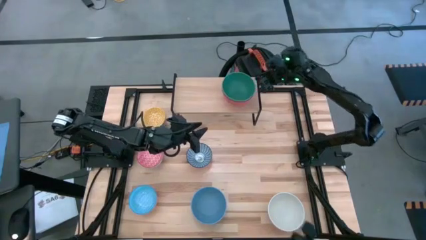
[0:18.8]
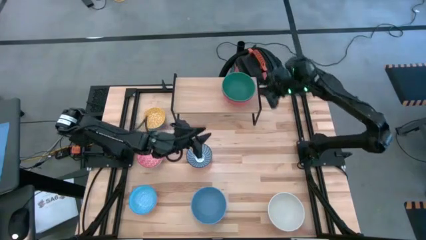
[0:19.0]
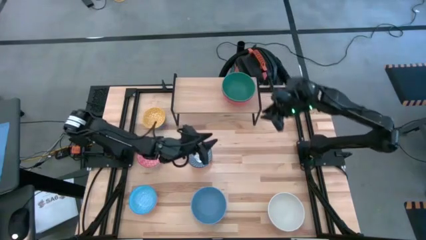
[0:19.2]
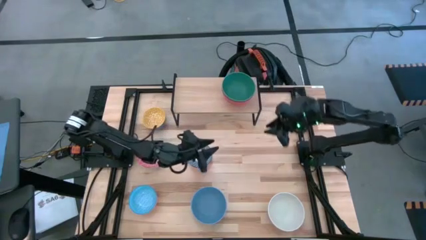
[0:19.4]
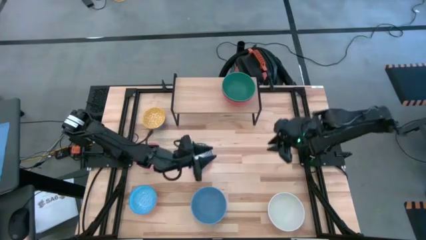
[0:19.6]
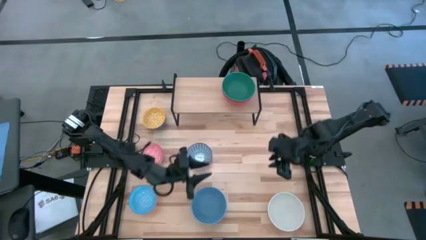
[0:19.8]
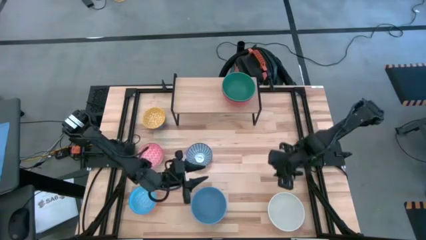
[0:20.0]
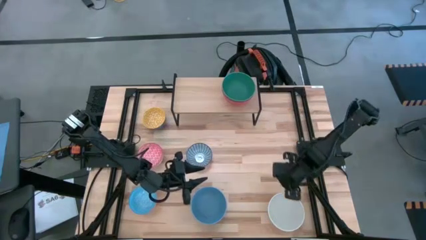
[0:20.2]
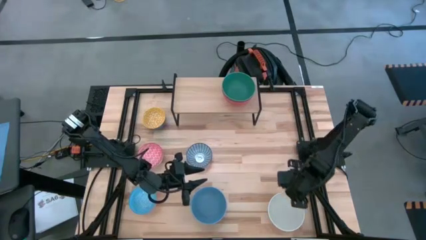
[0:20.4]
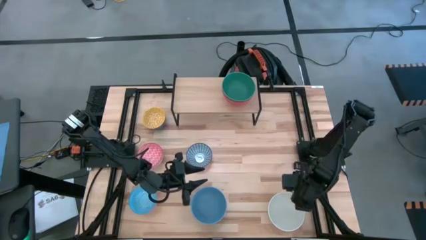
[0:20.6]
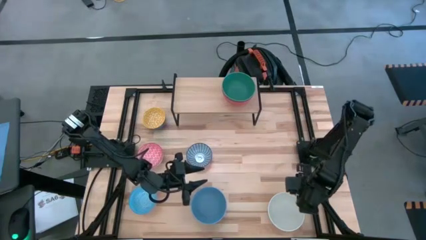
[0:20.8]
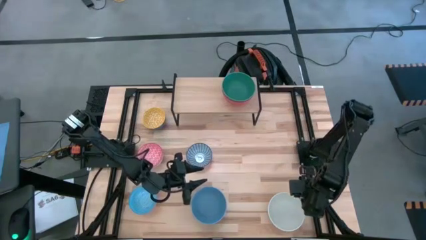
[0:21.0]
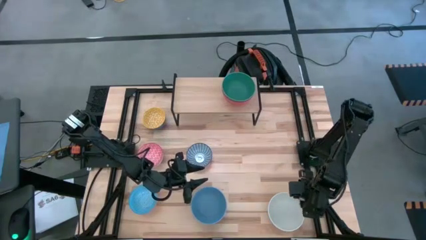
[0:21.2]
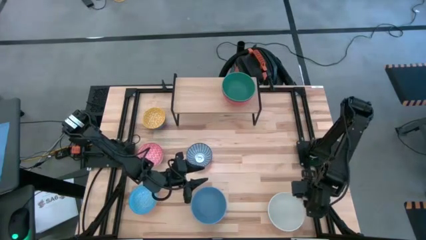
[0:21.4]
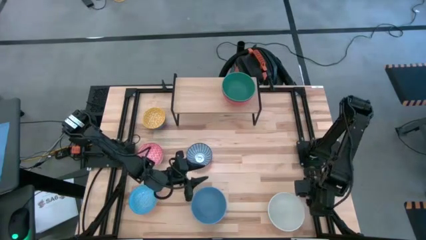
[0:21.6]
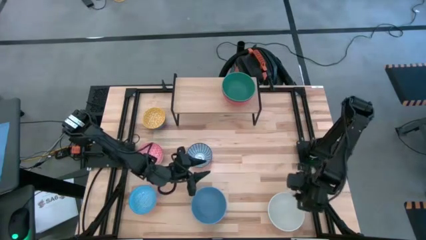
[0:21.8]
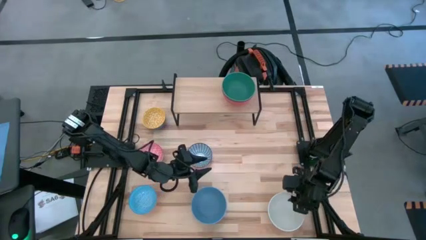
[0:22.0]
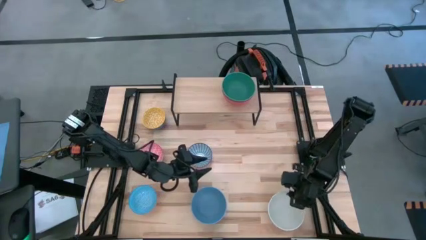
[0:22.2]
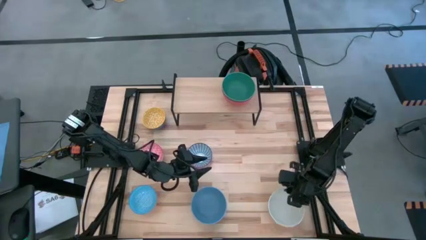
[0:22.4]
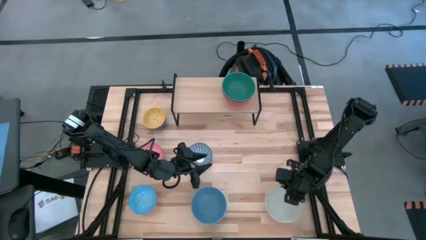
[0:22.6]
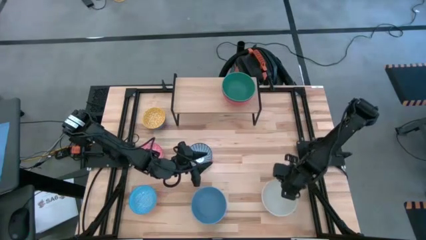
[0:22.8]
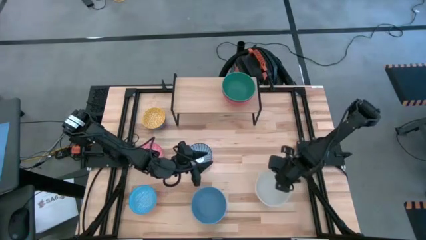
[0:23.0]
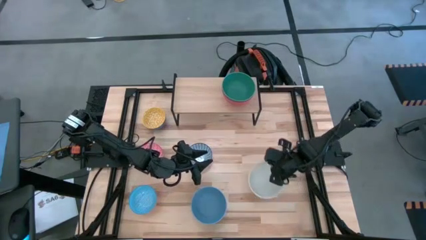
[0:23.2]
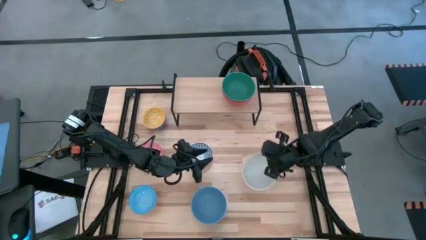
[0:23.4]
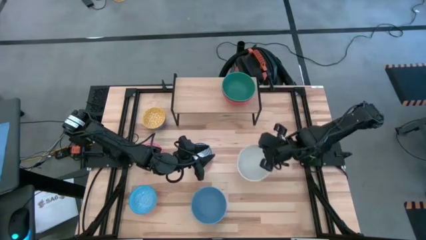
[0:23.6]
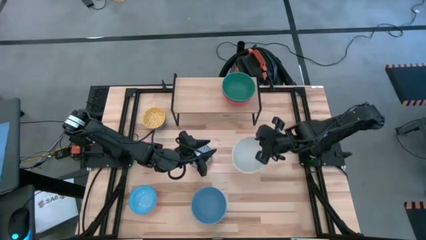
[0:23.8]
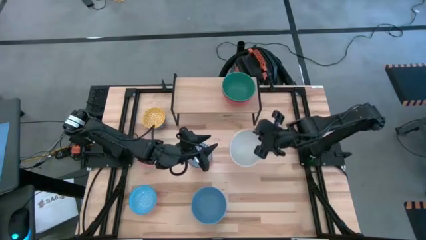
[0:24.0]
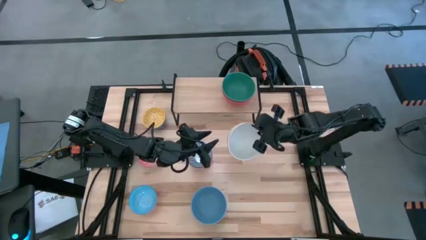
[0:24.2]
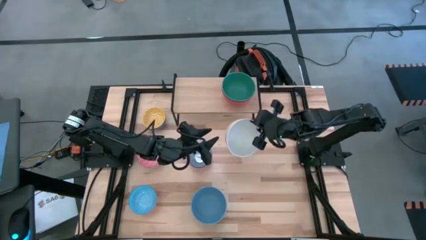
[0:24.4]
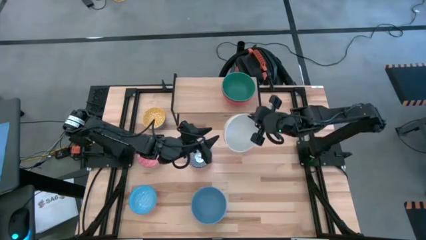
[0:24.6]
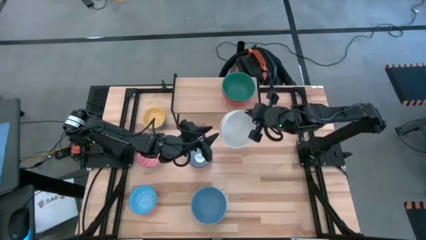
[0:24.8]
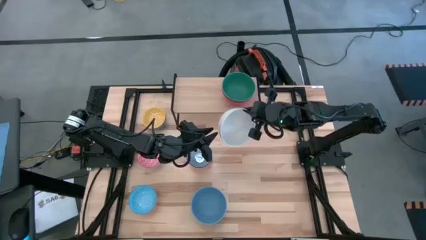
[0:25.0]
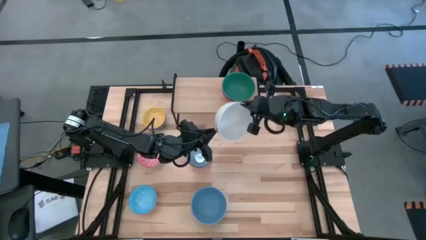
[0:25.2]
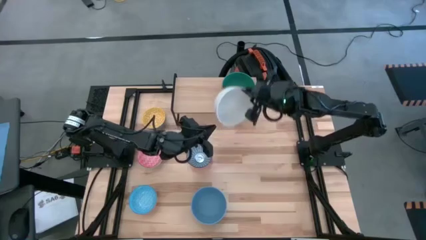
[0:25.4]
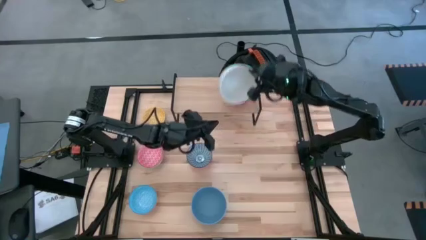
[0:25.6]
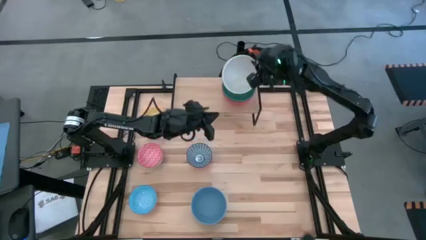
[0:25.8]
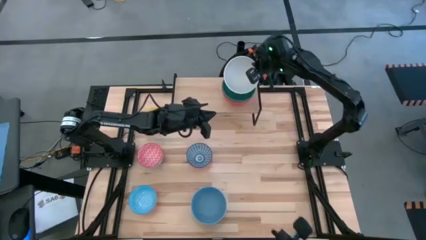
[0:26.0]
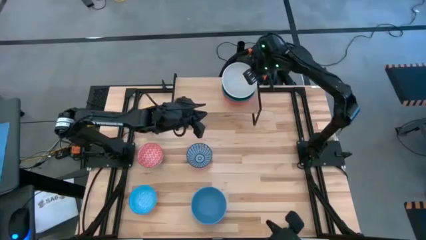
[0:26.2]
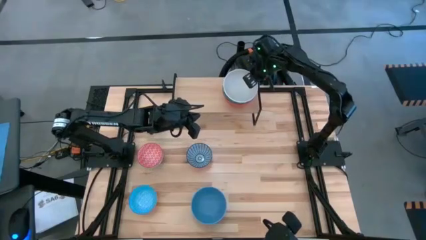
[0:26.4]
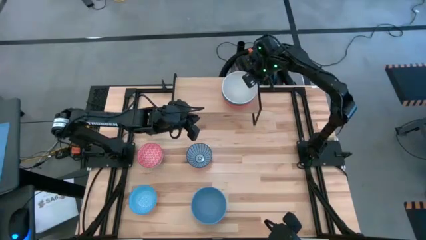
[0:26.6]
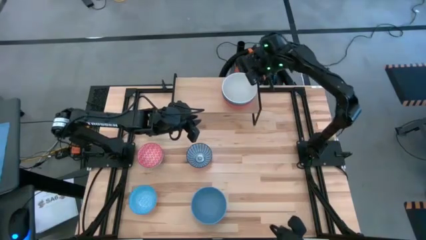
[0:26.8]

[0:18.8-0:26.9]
Task: Place and stack bowls onto a shelf
Stack the white bowl on top of the green bowl on the shelf

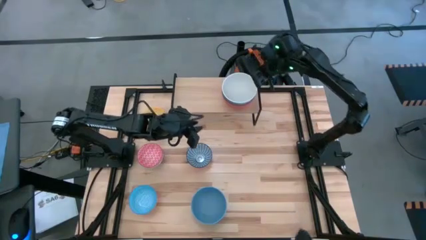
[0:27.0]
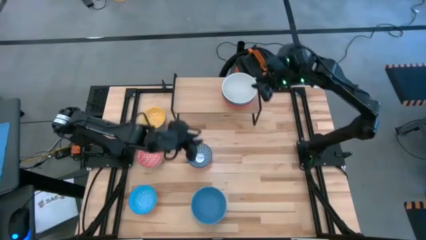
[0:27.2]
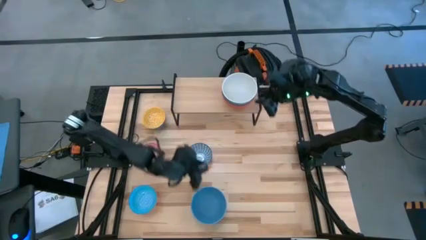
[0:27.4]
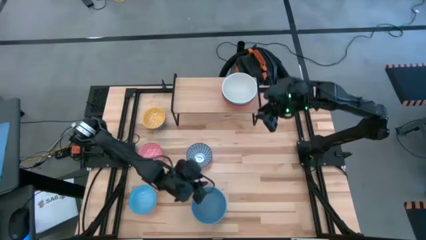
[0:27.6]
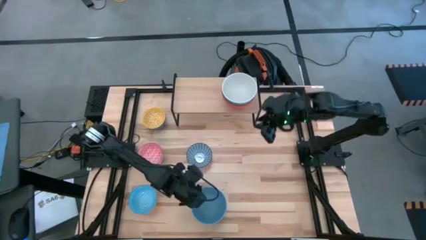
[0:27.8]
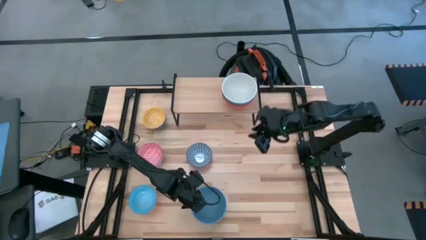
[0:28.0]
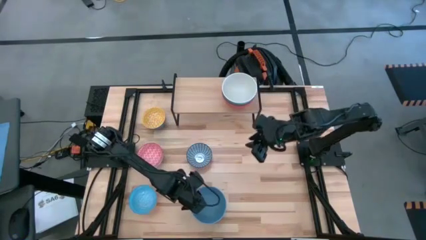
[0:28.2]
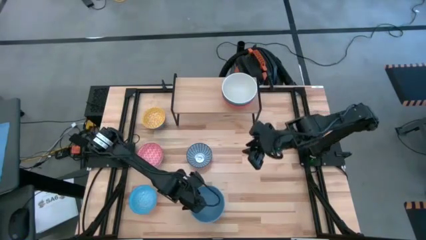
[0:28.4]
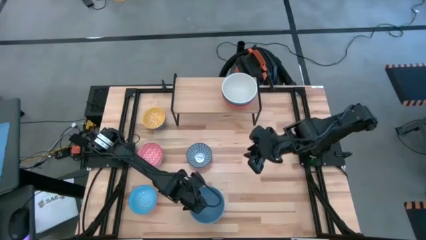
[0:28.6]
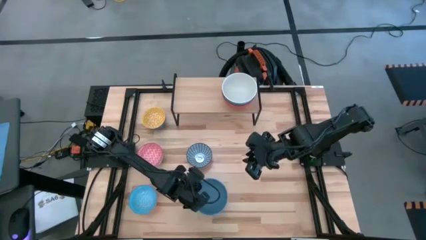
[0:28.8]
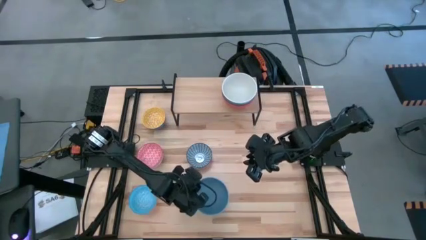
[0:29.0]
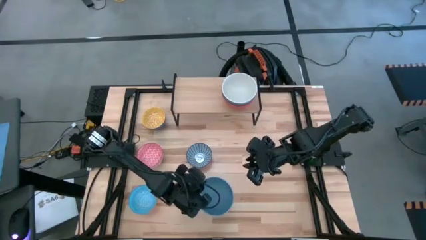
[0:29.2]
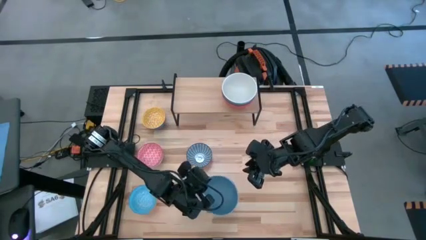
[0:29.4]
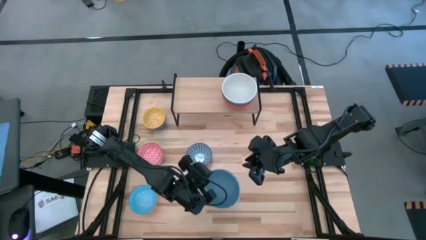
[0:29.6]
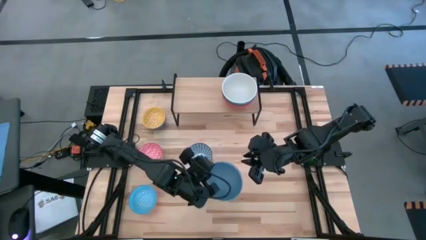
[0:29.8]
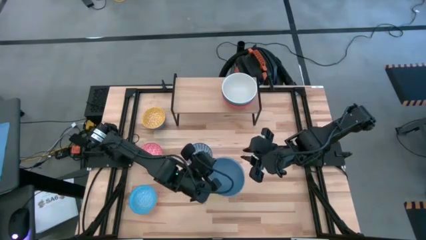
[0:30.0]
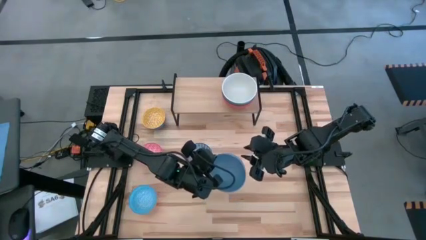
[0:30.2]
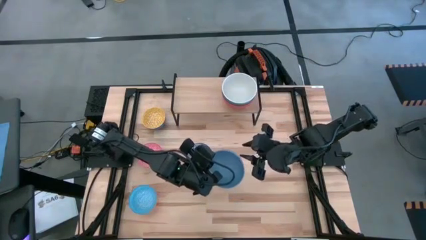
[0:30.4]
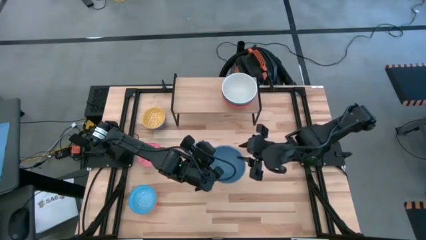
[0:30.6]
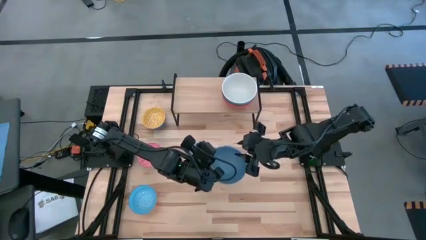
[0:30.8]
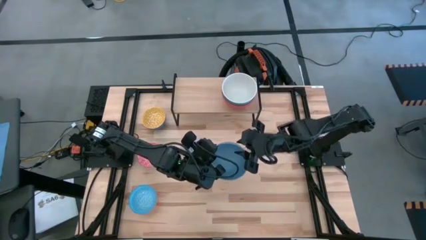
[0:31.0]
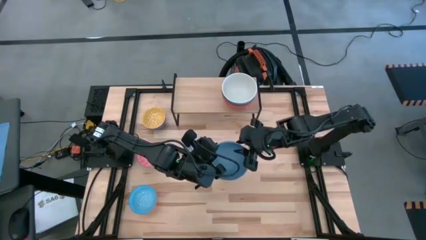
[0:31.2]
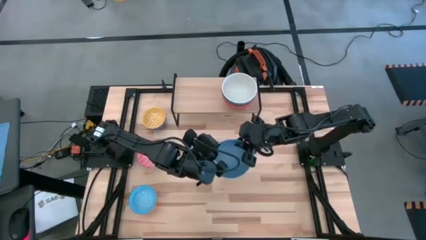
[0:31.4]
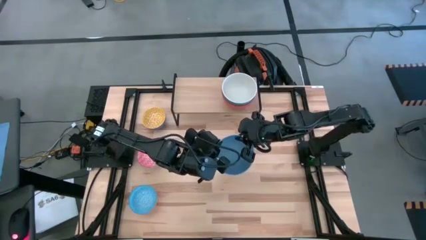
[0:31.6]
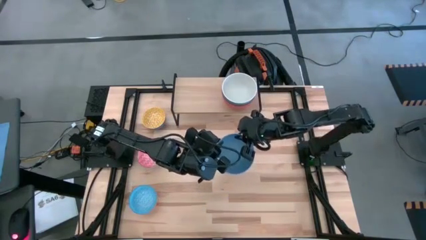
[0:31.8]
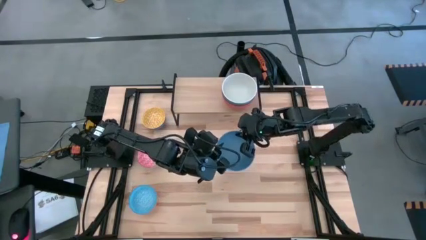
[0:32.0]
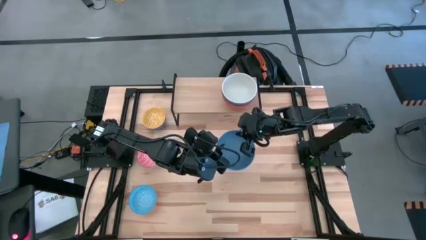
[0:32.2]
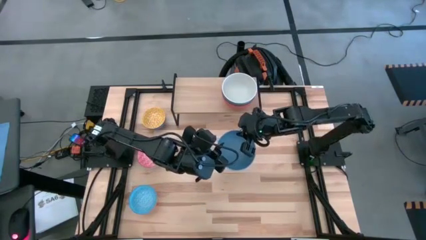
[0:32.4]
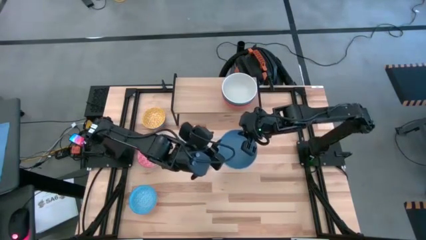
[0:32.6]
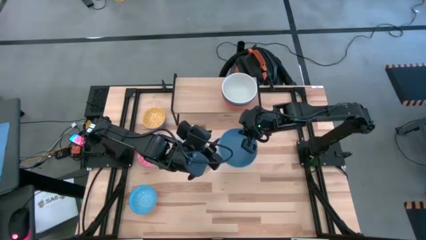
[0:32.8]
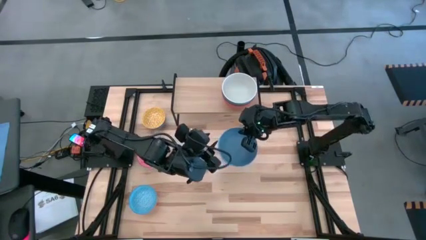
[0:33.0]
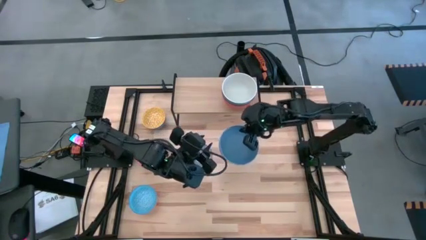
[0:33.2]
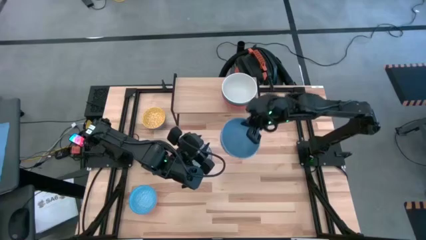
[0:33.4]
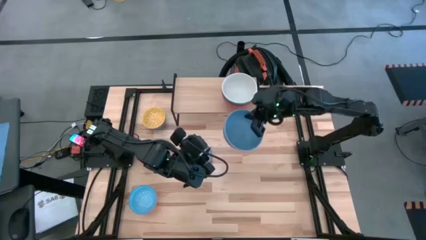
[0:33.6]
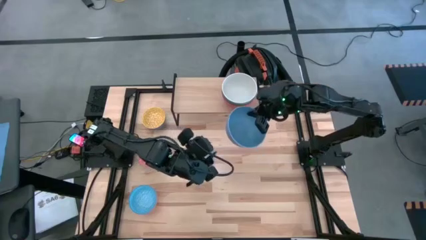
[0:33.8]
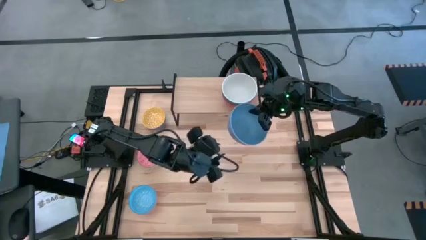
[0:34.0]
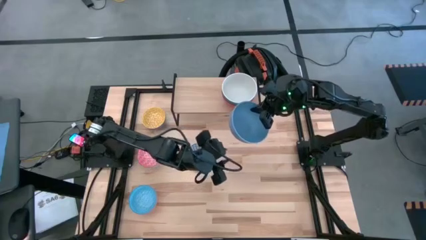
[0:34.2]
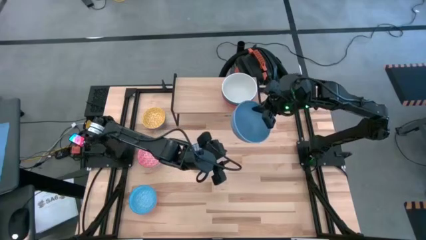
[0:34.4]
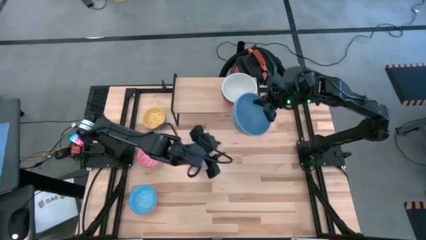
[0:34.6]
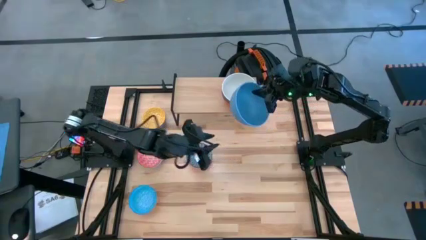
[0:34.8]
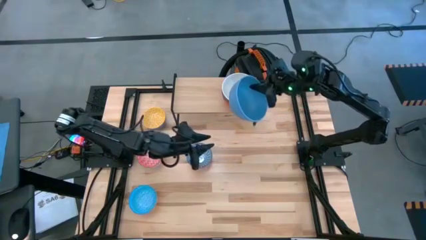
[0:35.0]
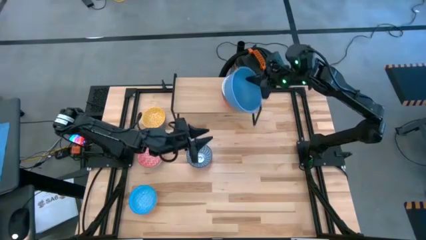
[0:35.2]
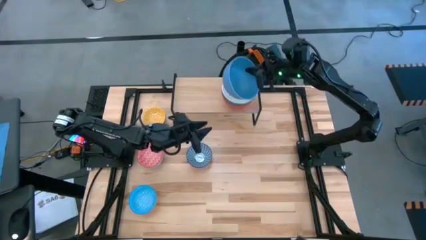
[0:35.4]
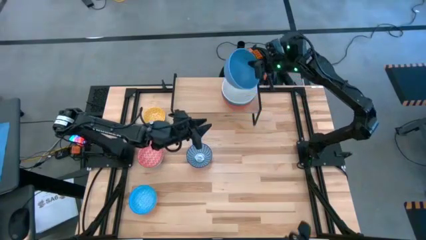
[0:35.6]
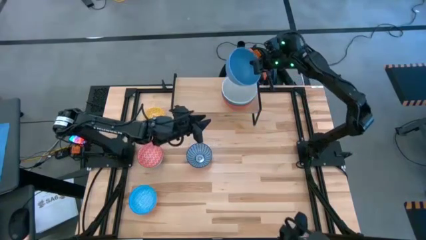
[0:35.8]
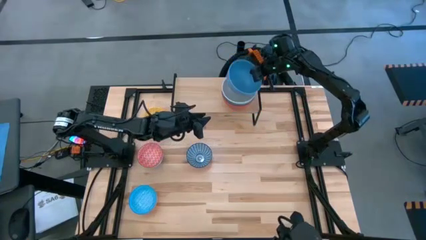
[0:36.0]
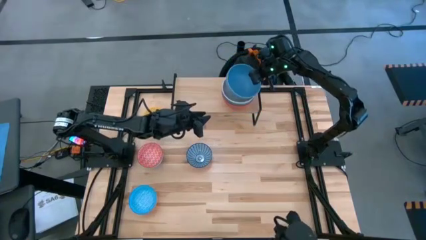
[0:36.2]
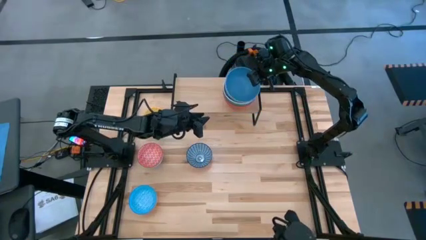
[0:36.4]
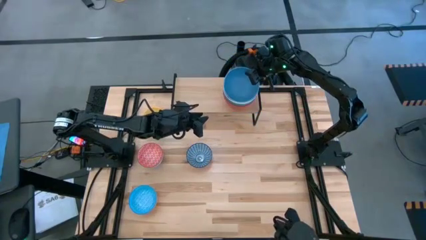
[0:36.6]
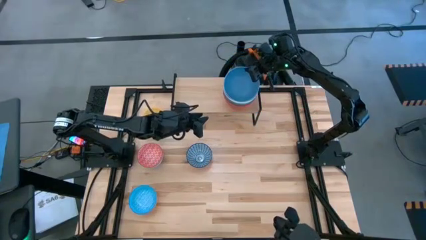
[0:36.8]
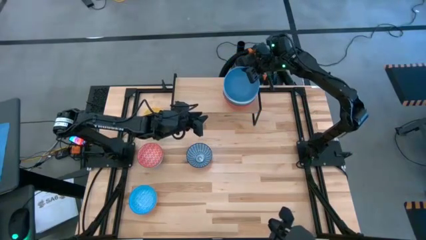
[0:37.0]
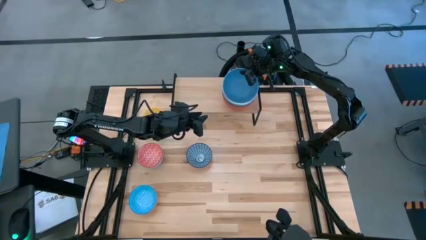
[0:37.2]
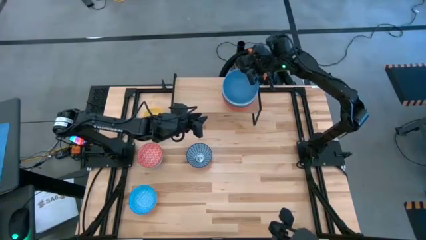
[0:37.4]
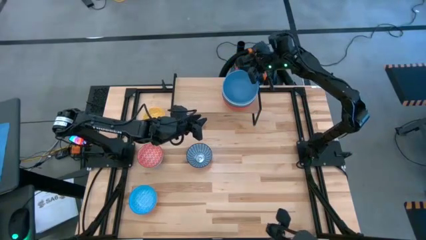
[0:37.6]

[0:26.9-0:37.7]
Stack the blue bowl on top of the white bowl on the shelf
